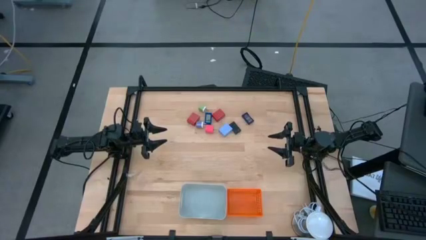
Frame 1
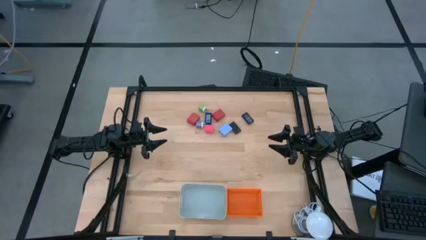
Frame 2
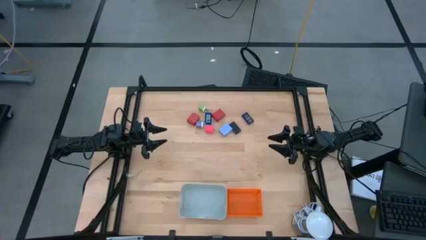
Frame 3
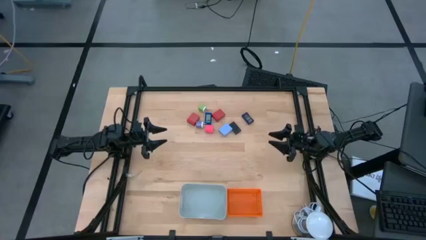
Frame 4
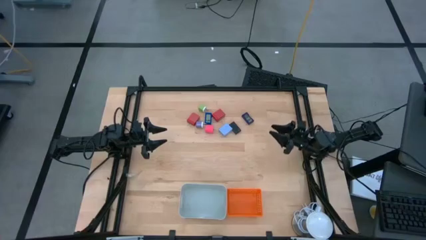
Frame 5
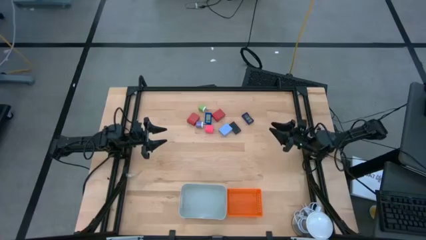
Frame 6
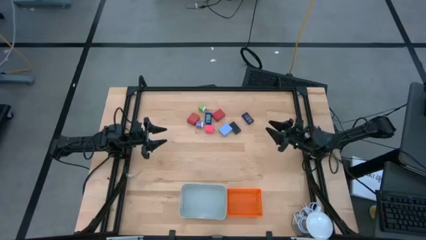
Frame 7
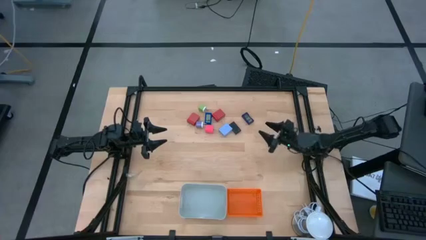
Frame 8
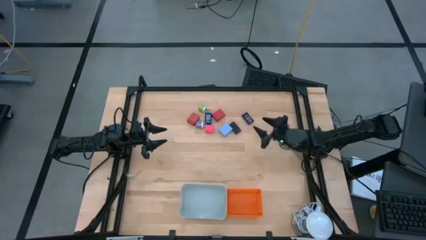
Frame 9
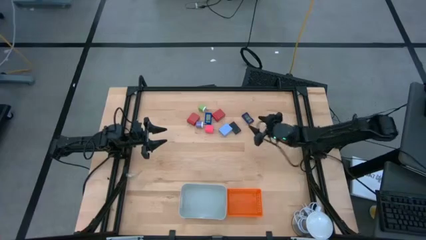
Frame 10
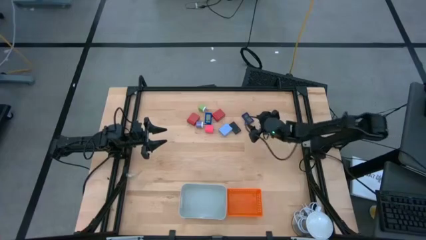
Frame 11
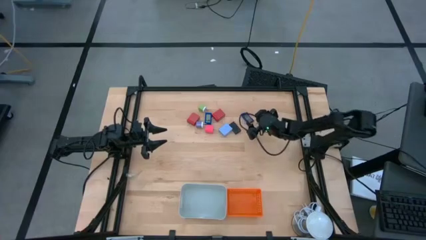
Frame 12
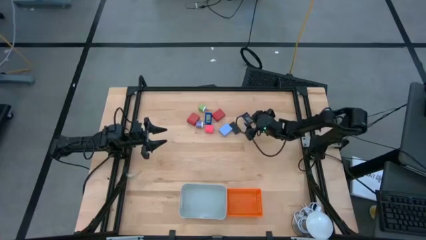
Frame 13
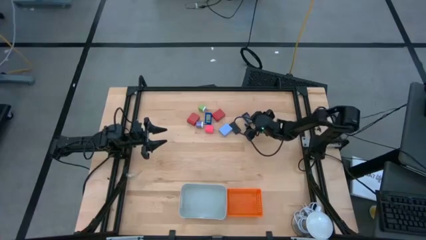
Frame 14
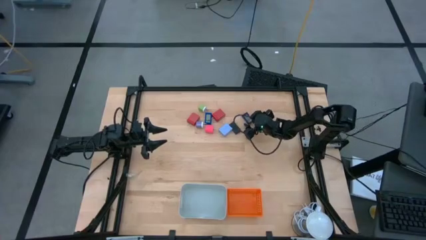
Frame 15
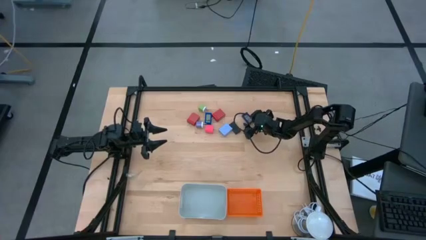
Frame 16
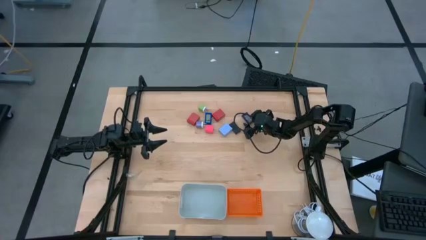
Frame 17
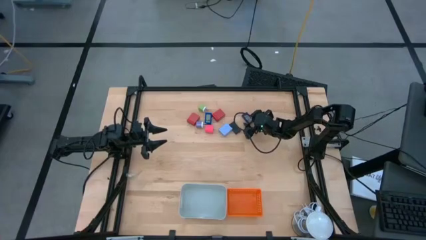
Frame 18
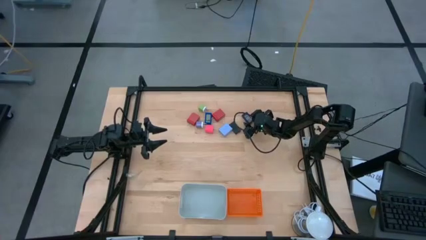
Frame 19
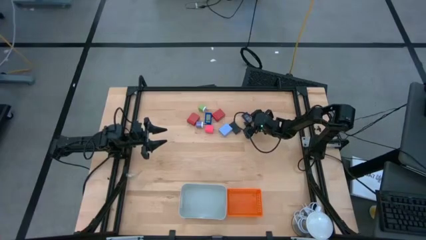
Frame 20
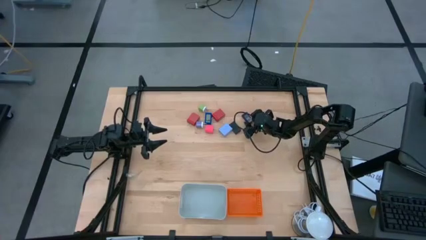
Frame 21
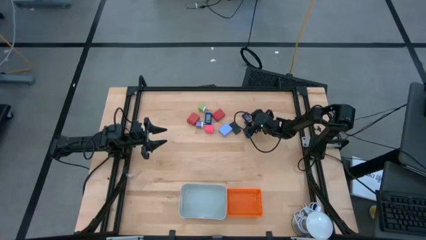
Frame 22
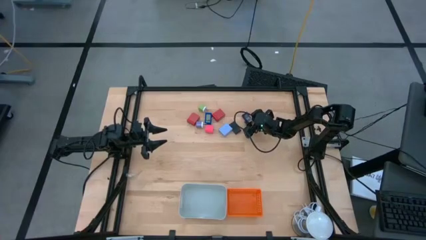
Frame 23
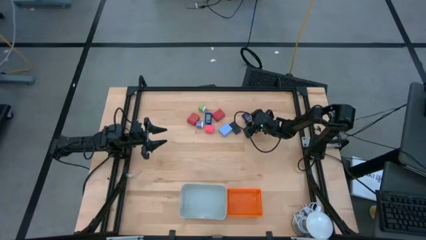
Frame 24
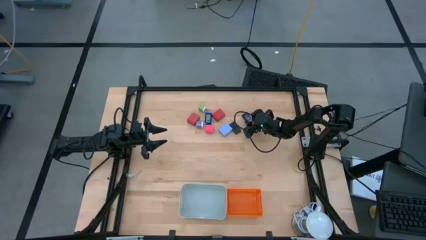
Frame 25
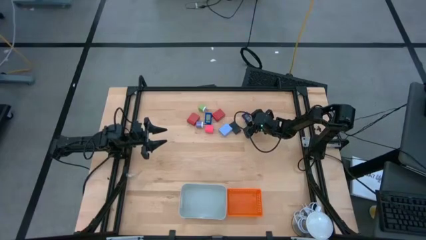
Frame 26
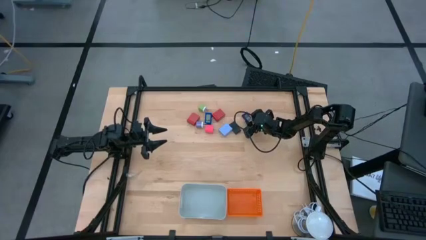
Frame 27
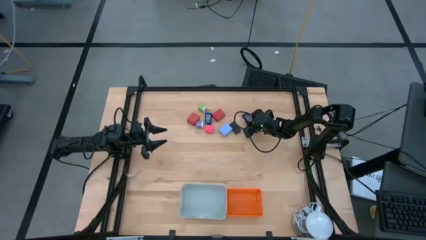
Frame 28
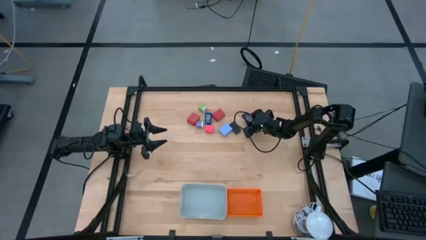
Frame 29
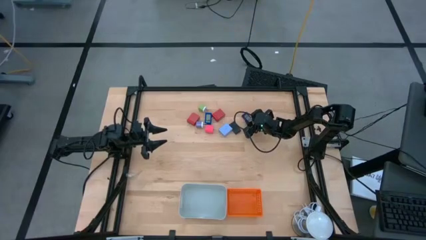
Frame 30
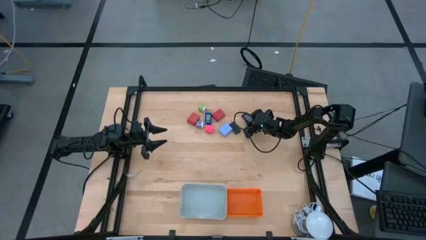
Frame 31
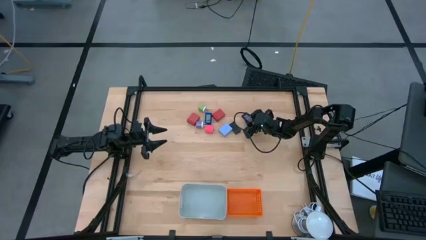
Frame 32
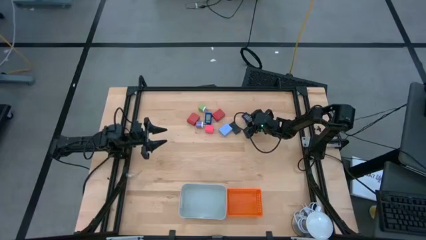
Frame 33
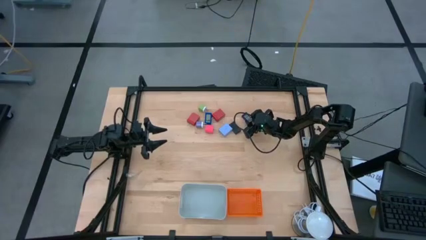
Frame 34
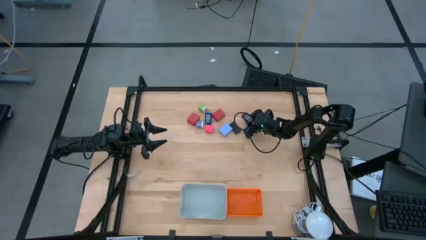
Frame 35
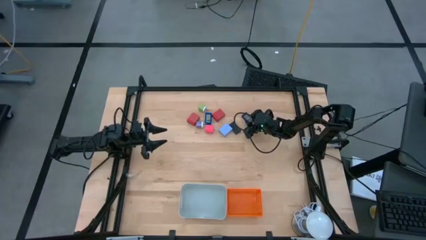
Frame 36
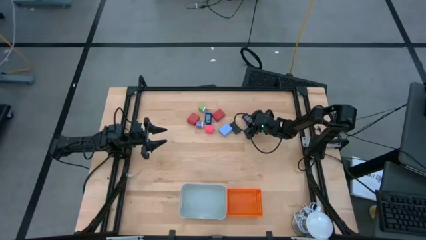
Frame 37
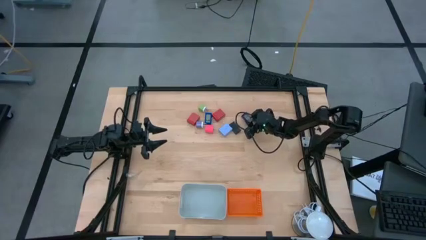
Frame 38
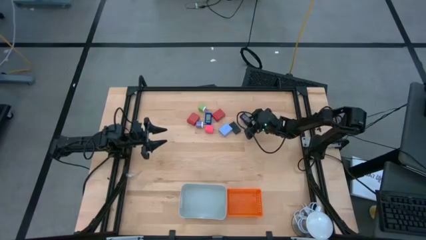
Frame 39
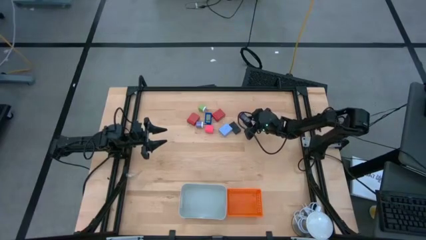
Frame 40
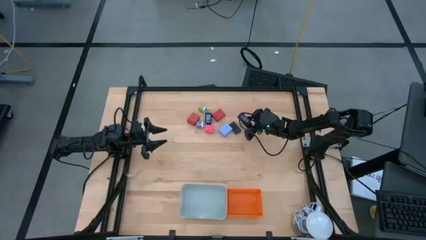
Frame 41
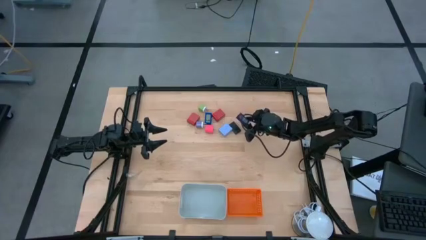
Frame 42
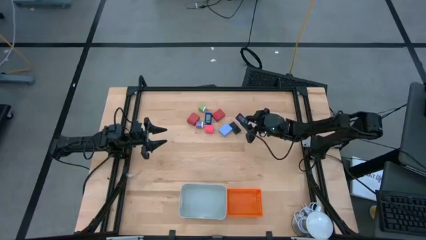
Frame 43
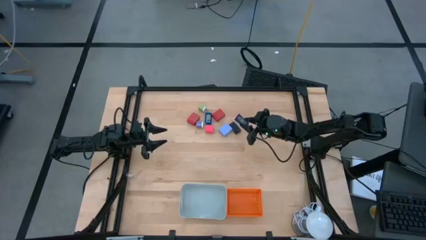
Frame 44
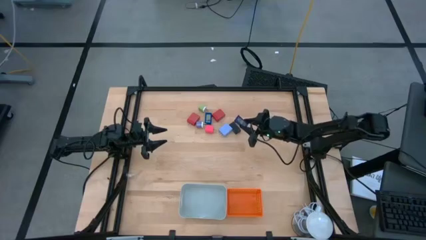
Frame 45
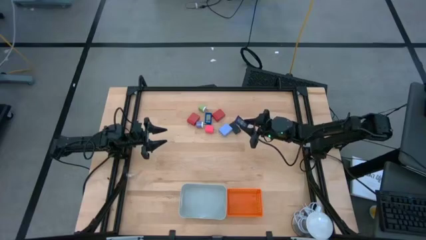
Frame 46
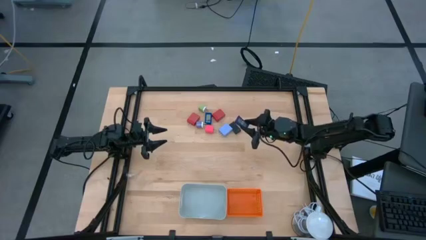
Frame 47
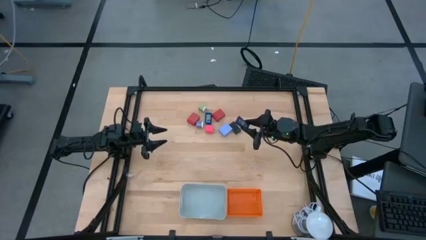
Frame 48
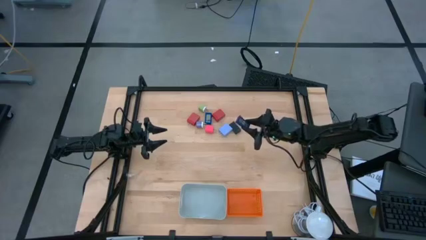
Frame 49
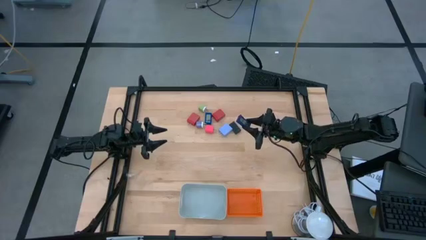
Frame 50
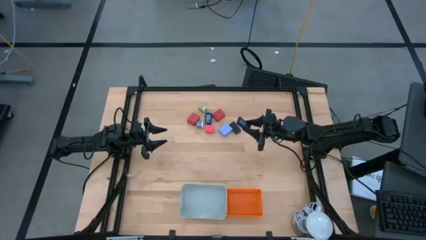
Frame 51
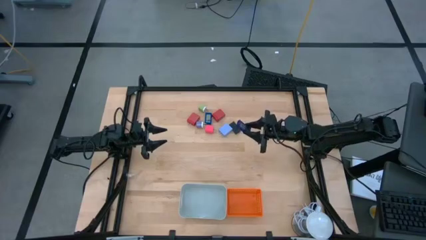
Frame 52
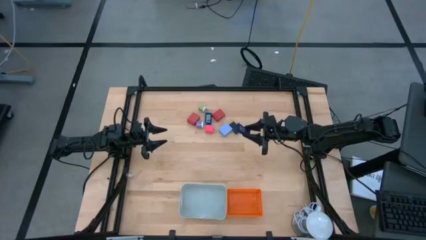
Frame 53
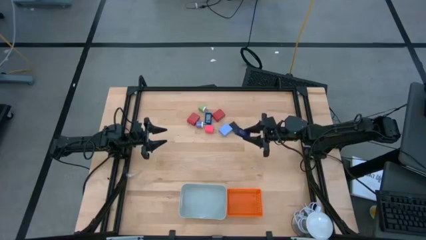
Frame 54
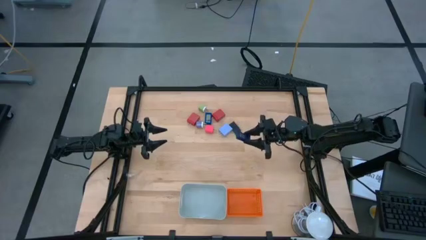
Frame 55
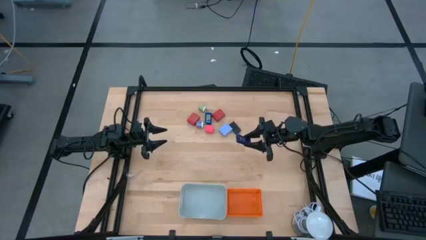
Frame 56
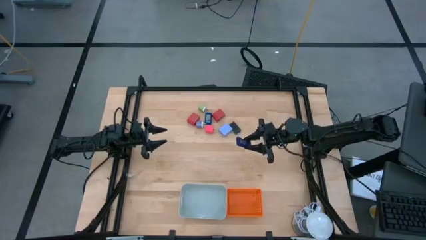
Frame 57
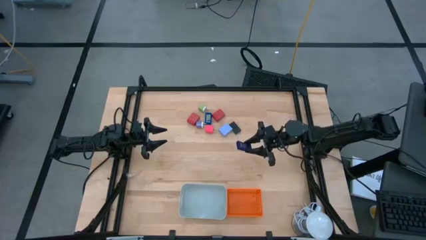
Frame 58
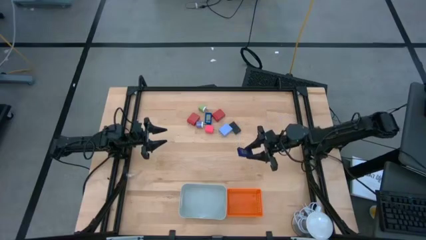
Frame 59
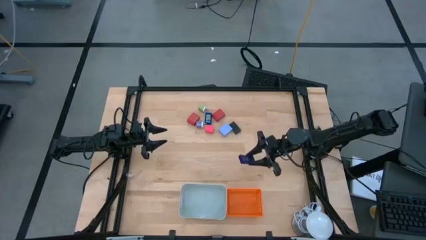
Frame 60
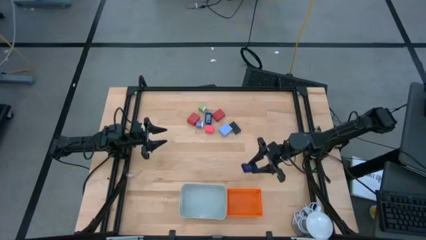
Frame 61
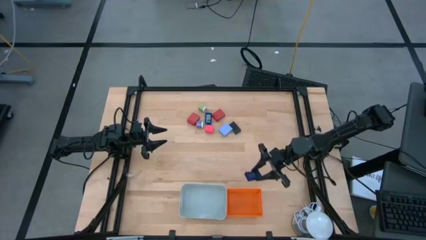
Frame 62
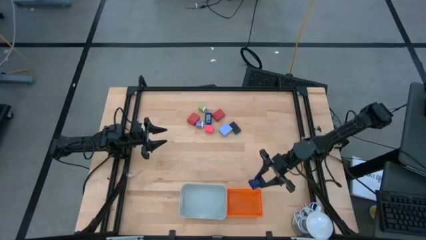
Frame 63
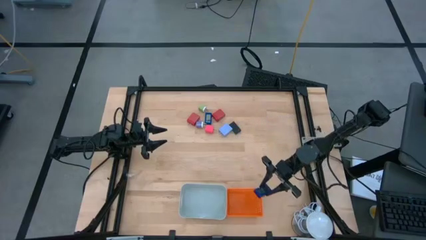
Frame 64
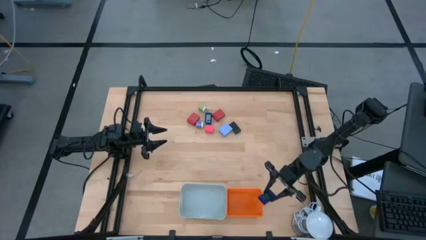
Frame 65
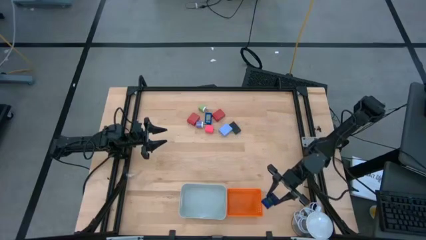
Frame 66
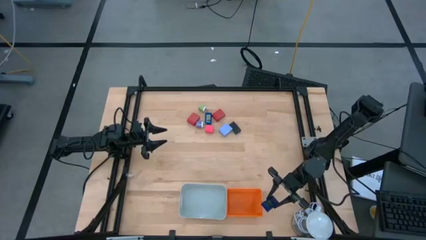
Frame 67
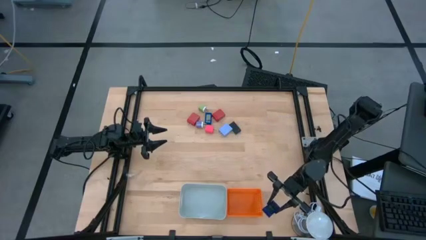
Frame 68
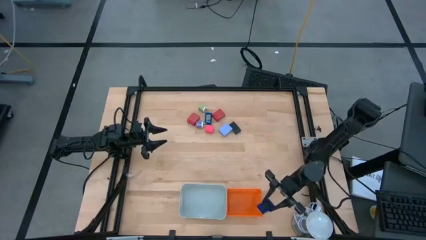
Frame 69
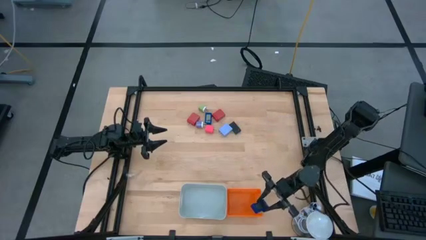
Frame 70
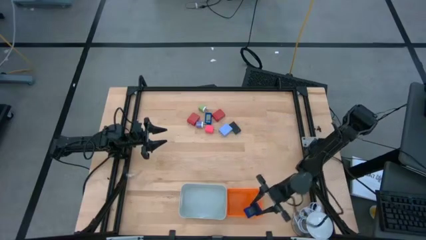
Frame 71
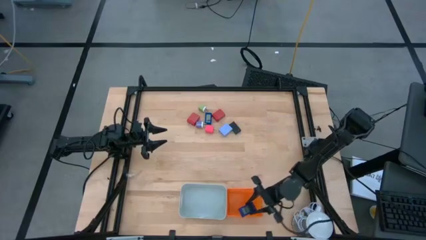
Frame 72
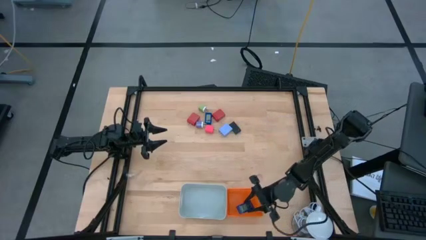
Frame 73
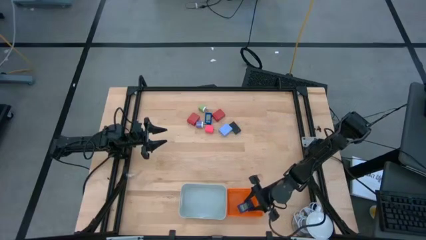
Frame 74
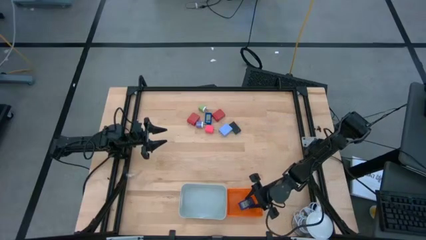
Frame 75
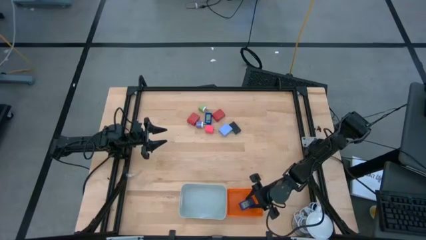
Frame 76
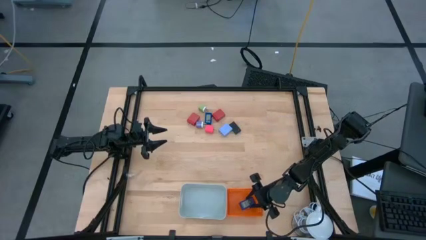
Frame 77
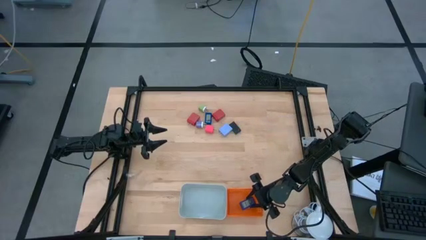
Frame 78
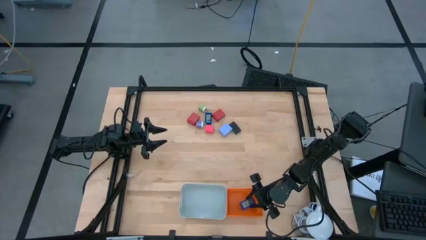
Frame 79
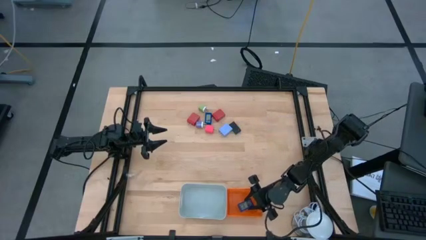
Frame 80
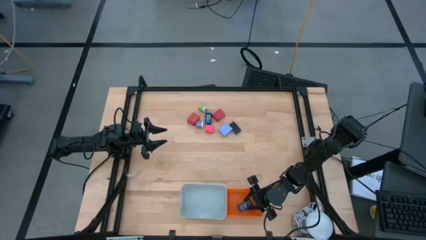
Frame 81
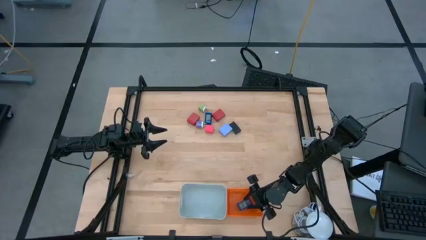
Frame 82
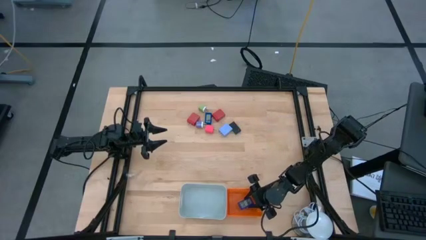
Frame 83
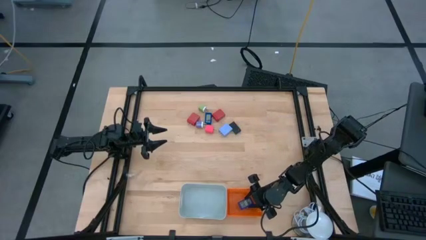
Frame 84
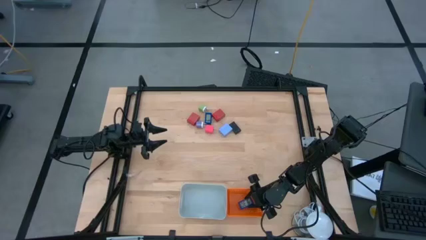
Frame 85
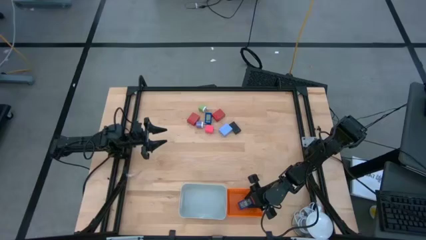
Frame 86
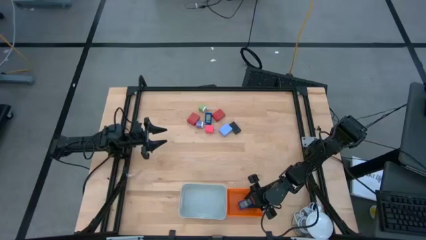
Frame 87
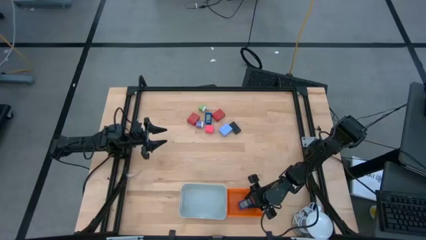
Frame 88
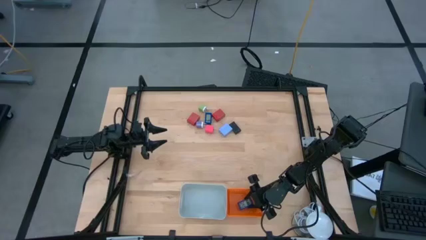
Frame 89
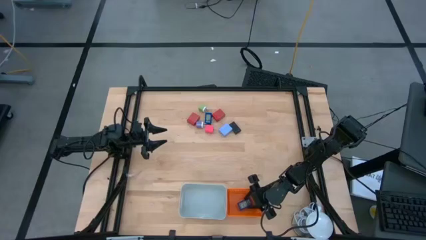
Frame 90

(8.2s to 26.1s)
Task: Pick & Place Office items
Put the right blue digital timer into the orange bin
